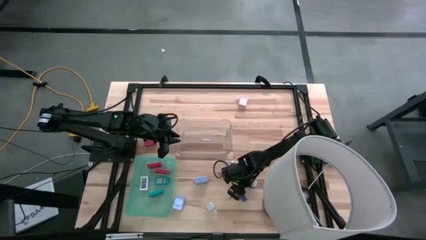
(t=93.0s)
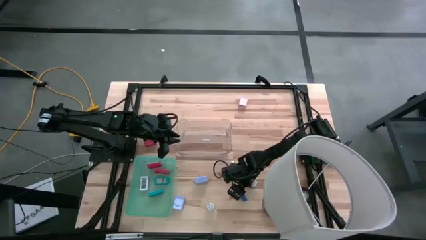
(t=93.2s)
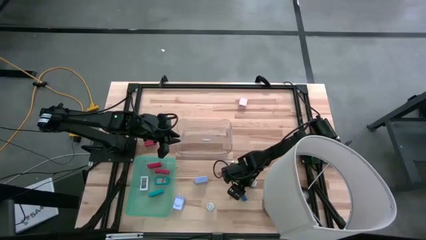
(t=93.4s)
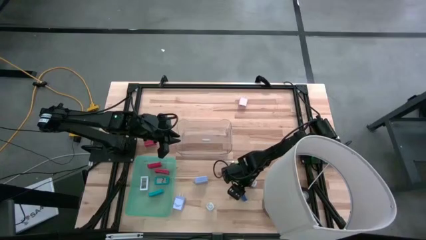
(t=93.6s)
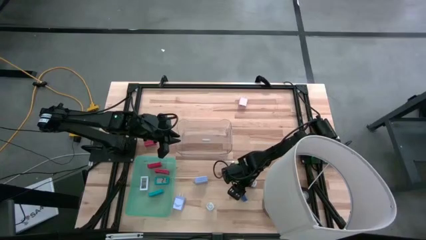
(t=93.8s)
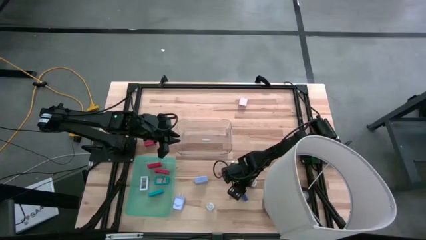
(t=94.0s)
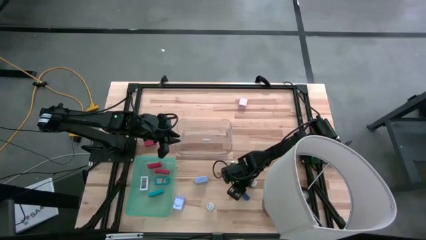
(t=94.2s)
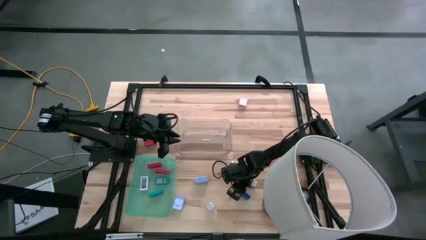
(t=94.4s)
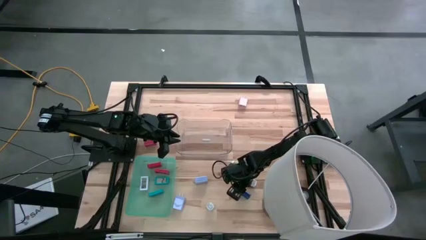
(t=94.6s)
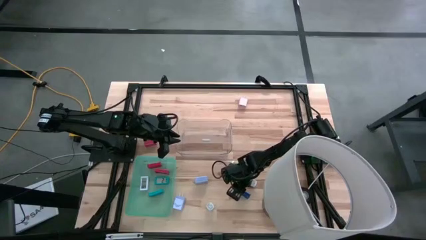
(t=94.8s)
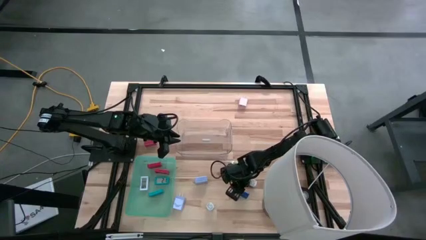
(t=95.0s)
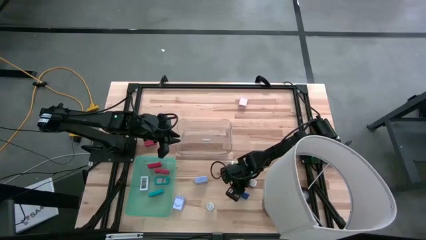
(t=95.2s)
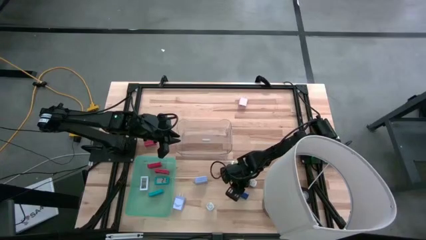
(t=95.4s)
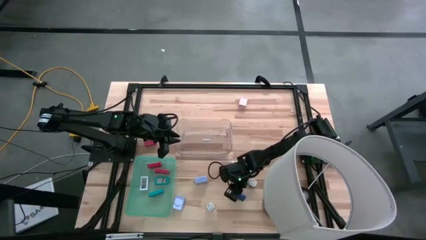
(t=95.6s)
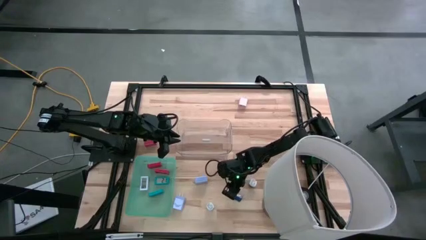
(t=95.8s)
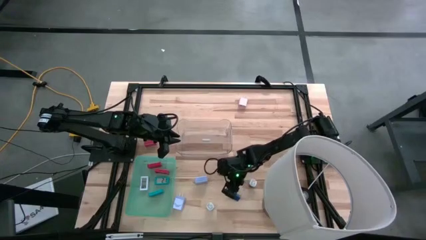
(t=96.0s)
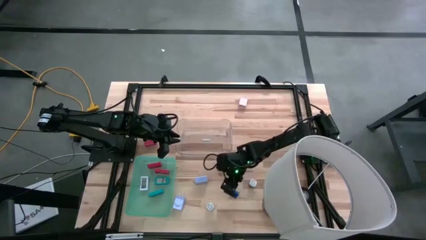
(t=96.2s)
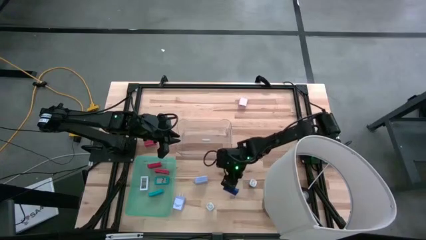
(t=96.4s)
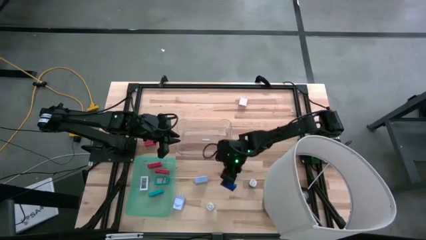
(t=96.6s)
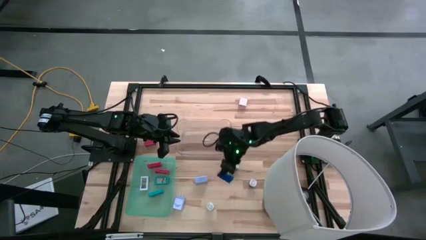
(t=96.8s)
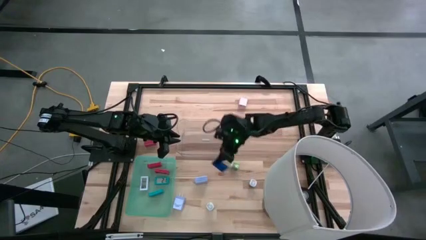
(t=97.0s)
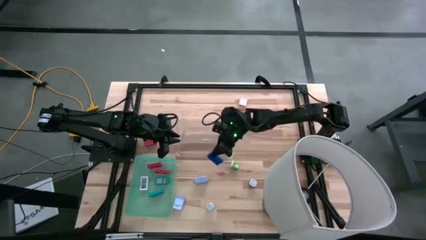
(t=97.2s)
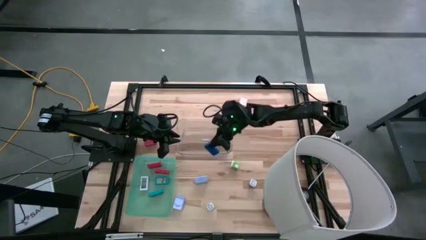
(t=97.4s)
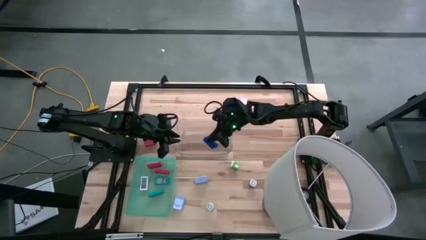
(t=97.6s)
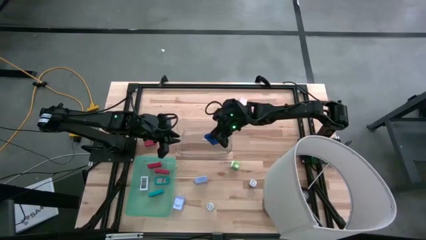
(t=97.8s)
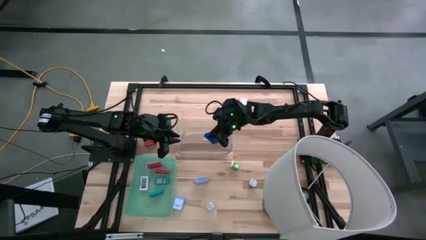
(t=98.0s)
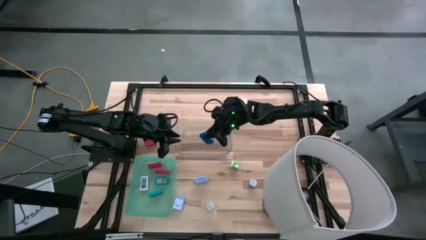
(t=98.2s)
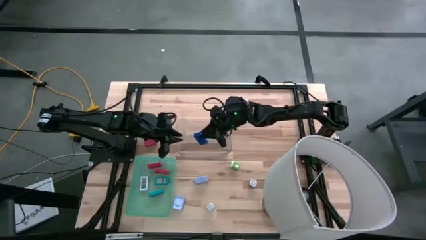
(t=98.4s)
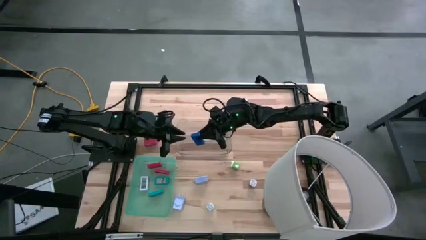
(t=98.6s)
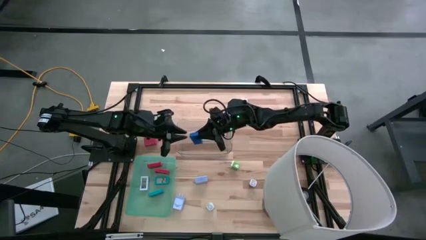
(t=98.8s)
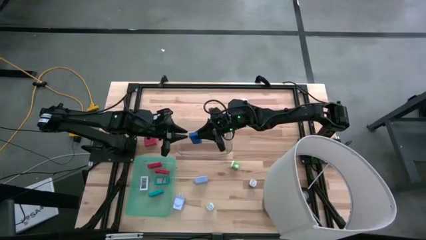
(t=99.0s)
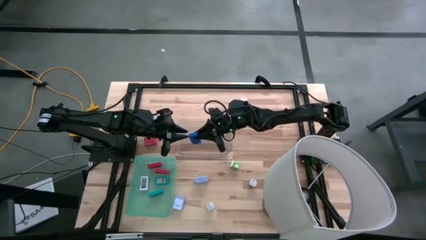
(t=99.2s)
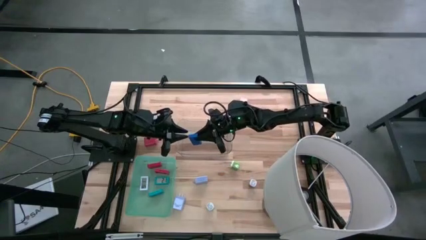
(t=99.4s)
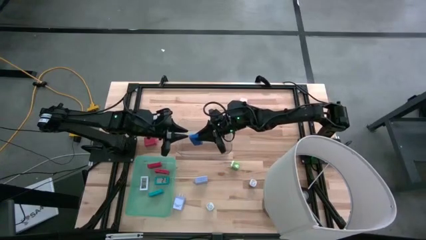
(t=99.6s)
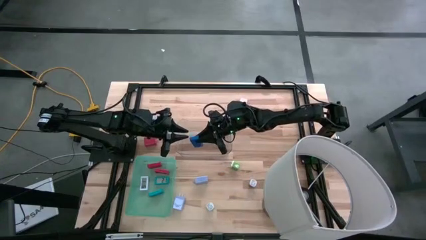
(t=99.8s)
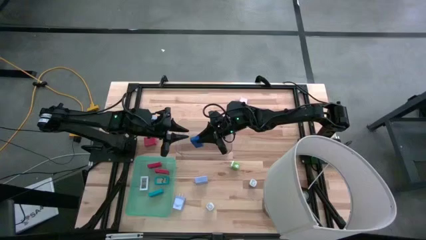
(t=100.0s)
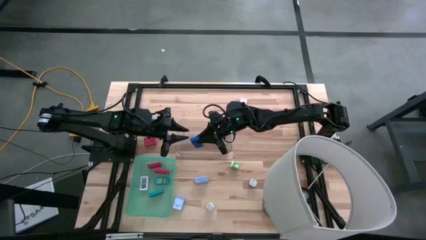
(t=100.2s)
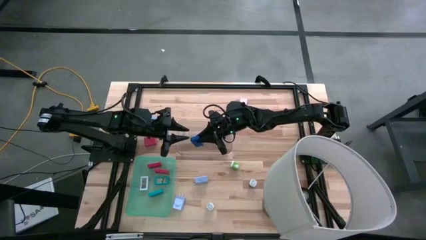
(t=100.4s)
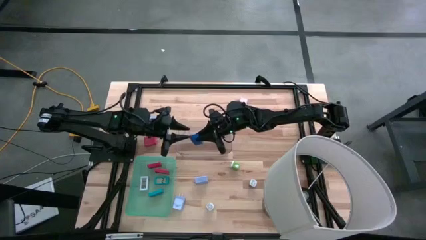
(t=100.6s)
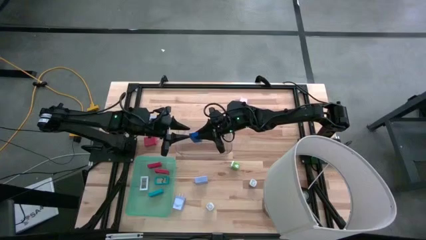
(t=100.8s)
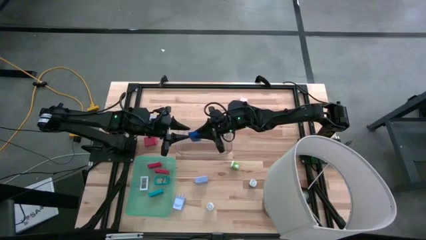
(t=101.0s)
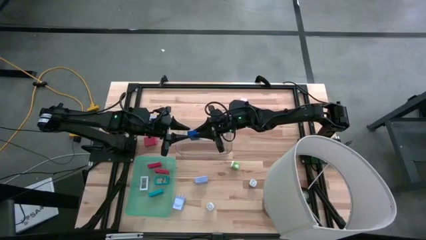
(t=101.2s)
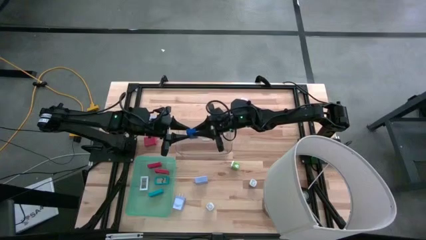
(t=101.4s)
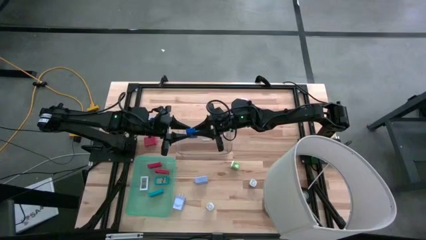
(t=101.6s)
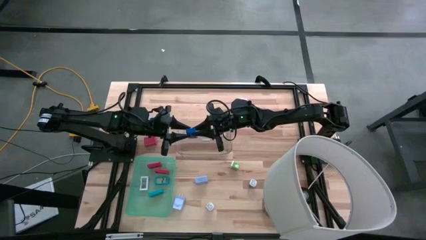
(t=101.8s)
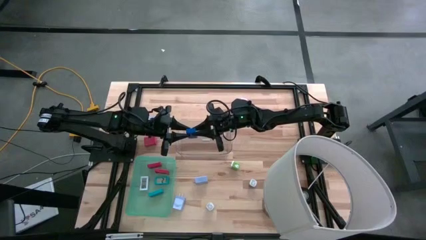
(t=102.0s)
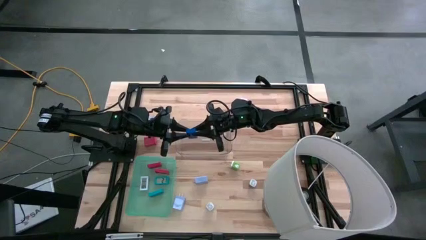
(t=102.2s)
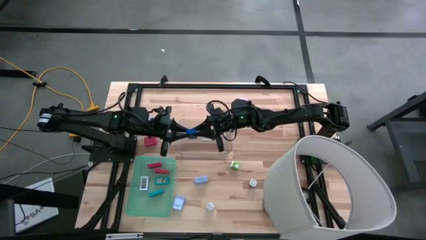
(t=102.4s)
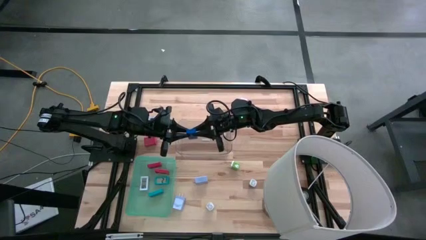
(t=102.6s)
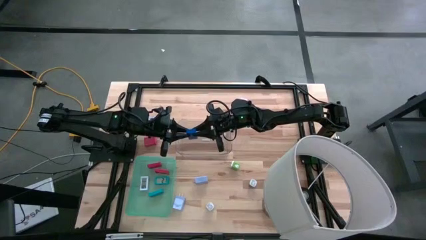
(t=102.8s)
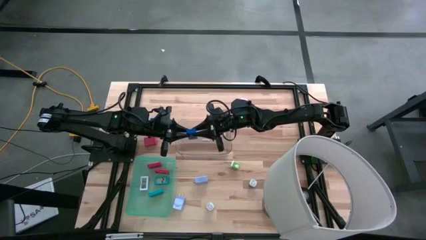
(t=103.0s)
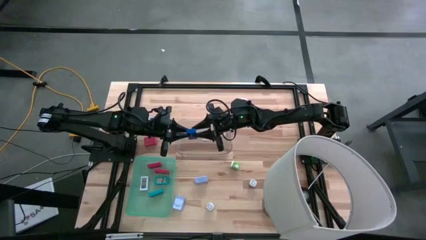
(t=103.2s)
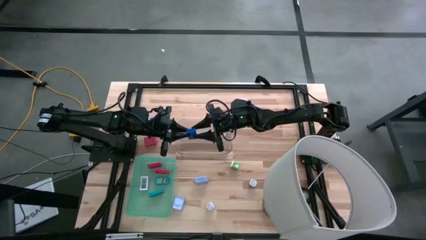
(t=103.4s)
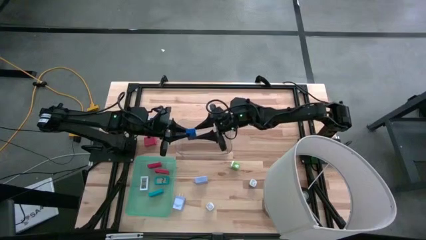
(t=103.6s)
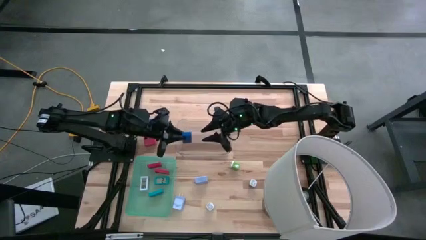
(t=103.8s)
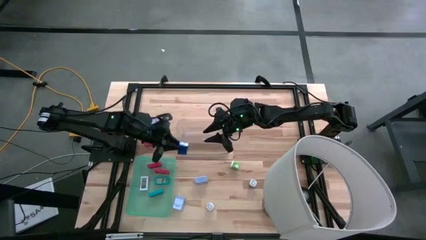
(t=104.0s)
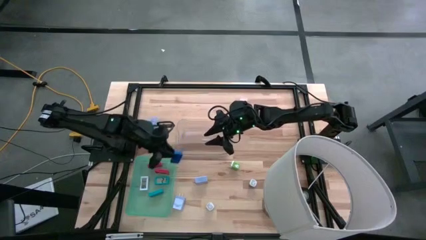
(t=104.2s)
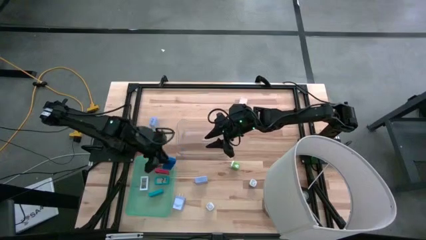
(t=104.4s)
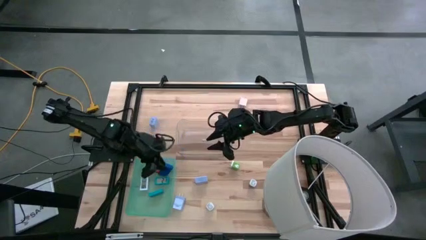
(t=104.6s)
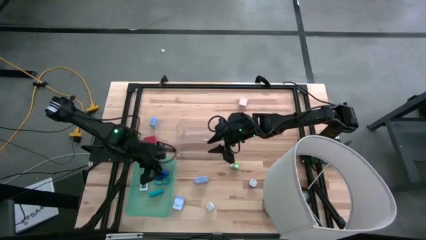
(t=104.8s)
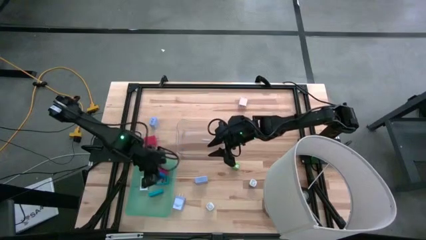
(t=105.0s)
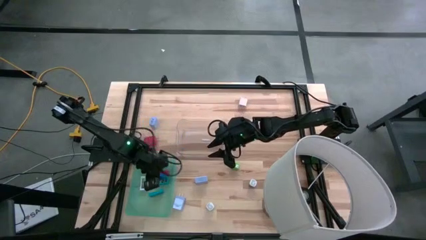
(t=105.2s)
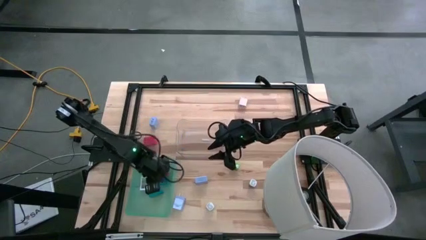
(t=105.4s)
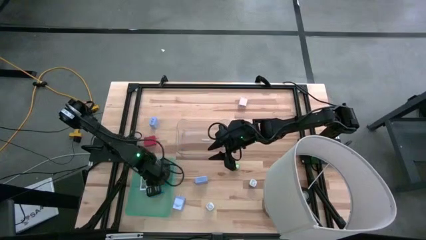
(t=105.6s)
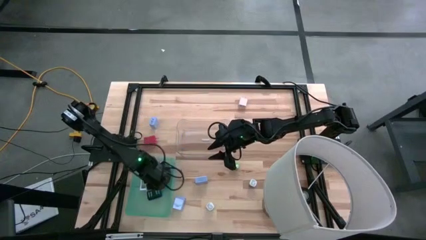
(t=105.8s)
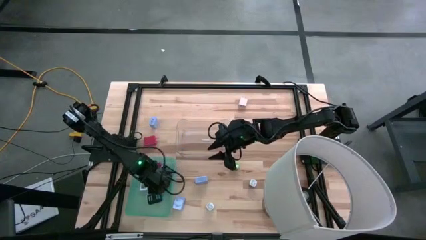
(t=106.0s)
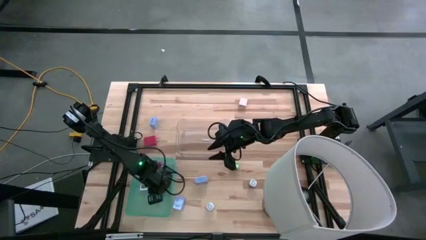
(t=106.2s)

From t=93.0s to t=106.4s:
Task: Pick & Place Office items
Put the dark blue digital clock into the green bin

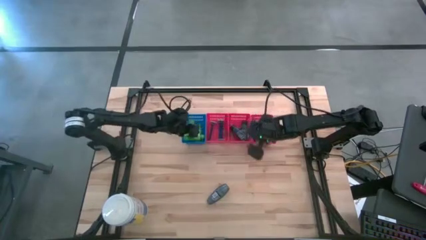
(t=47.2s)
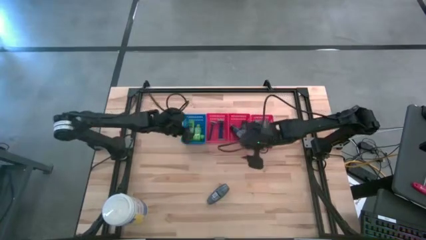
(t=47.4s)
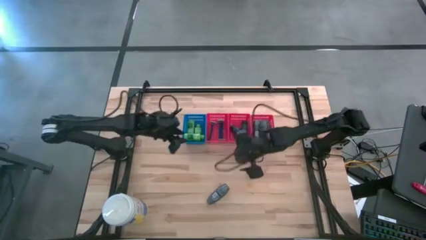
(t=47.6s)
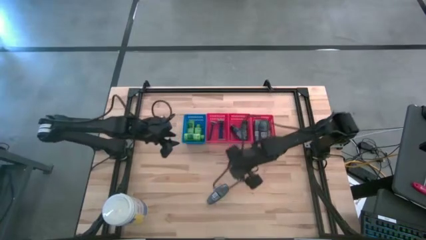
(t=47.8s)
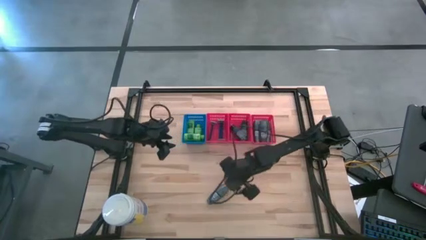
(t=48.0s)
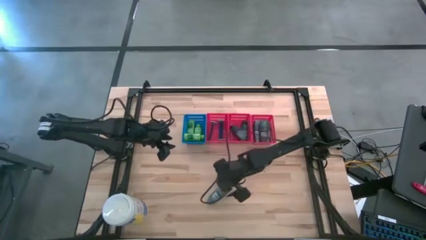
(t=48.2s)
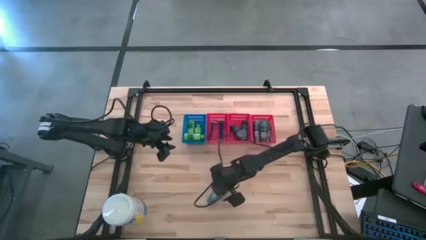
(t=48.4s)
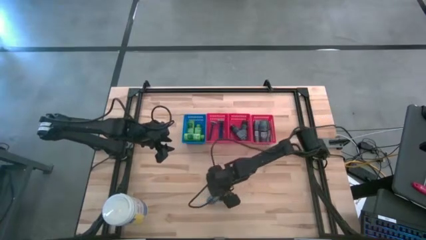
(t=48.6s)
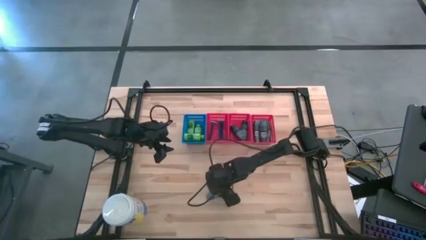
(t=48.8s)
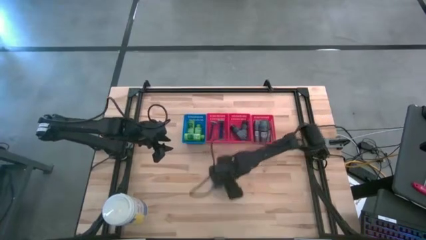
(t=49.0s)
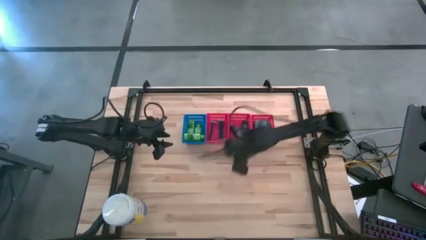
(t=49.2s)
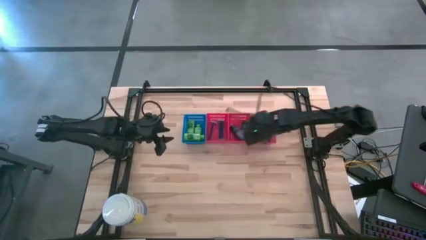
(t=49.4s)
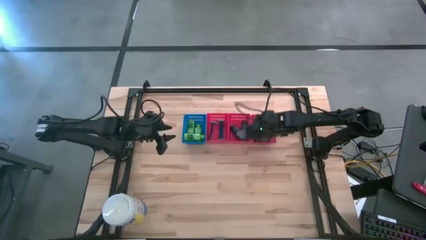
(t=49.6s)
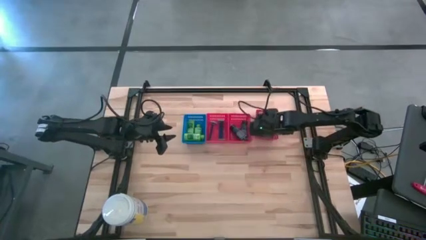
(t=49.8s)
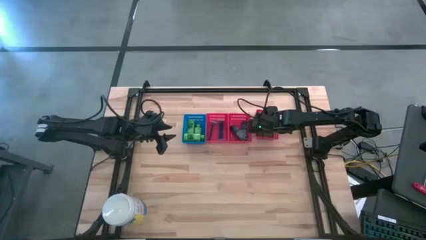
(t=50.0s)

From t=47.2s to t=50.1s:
Task: Pick & Place Travel size toiletries
Put the gray deodorant into the right red bin
